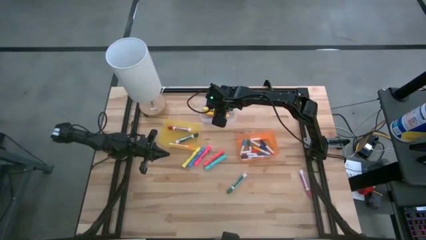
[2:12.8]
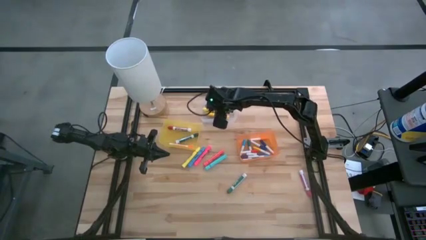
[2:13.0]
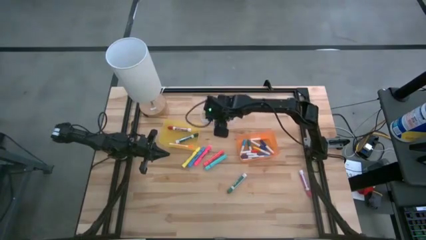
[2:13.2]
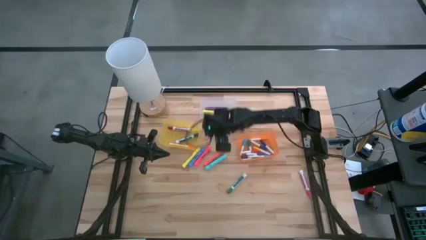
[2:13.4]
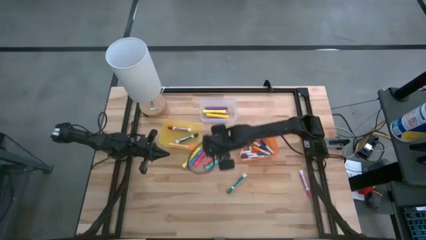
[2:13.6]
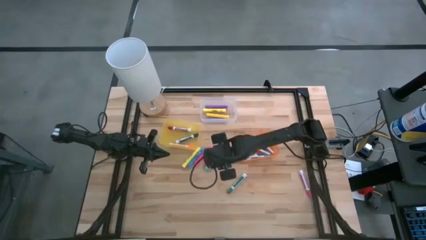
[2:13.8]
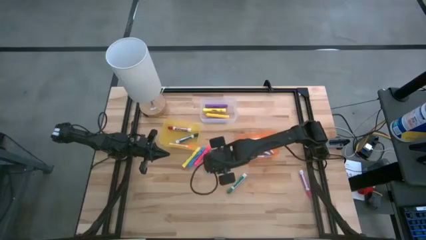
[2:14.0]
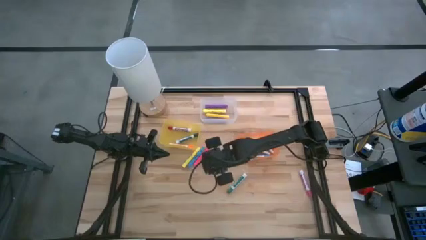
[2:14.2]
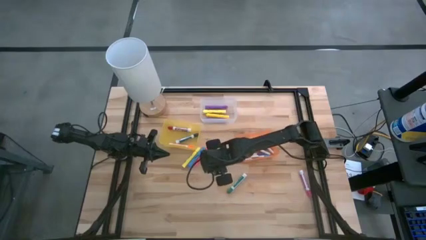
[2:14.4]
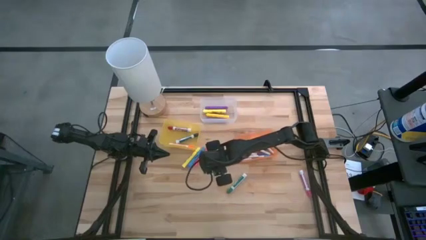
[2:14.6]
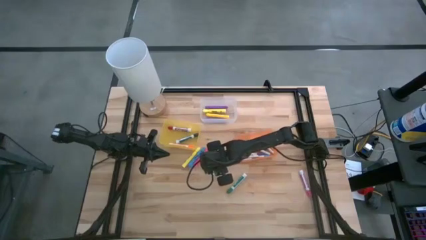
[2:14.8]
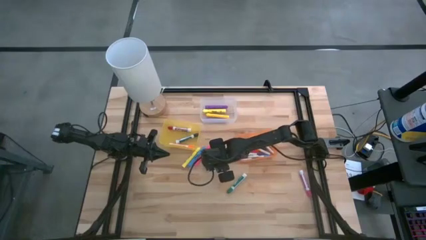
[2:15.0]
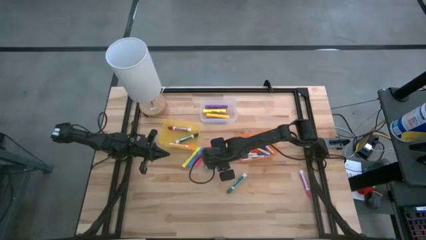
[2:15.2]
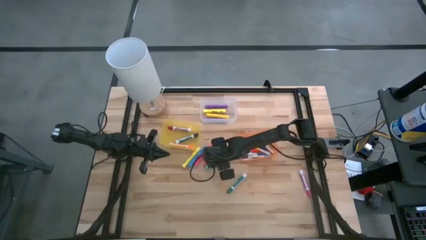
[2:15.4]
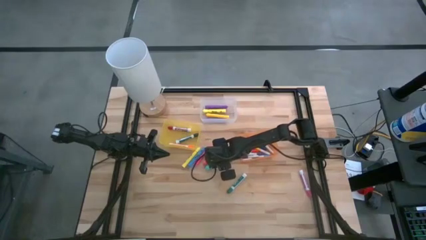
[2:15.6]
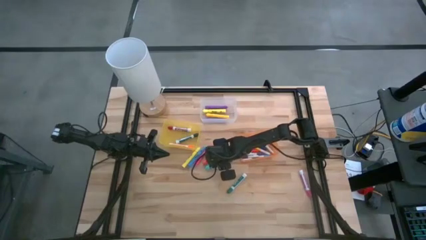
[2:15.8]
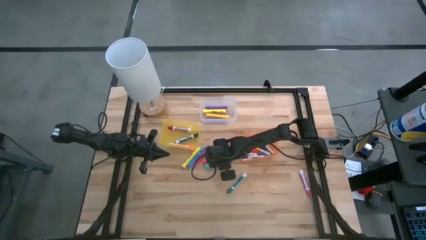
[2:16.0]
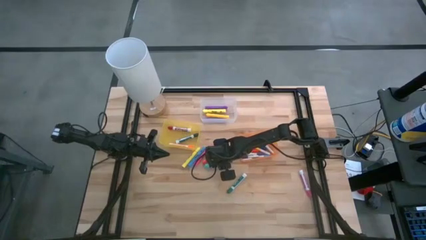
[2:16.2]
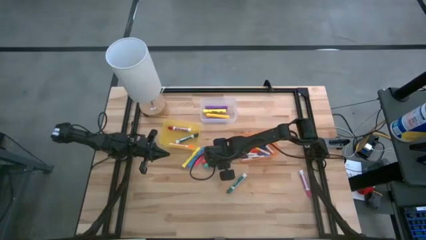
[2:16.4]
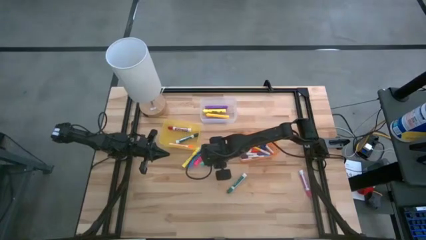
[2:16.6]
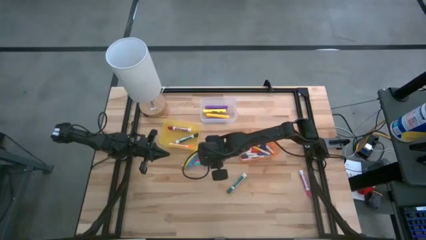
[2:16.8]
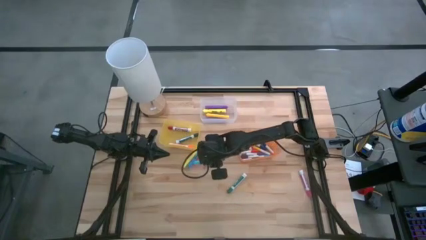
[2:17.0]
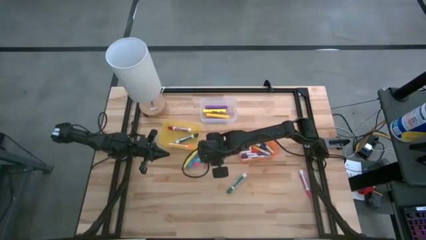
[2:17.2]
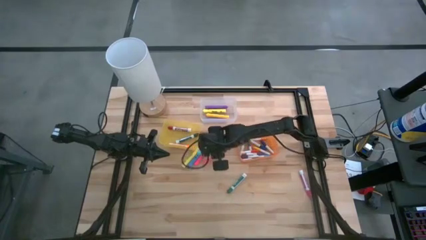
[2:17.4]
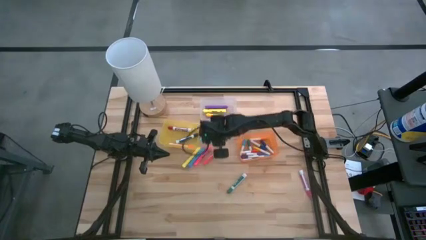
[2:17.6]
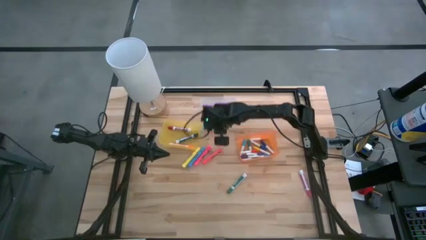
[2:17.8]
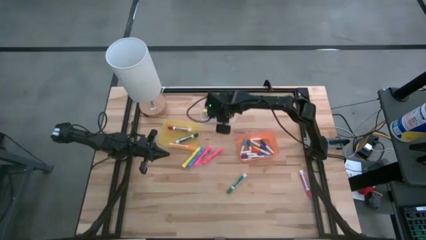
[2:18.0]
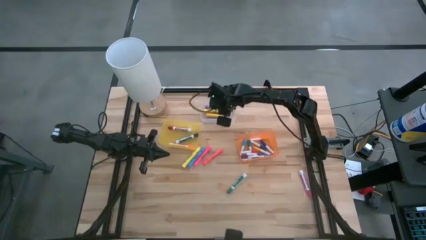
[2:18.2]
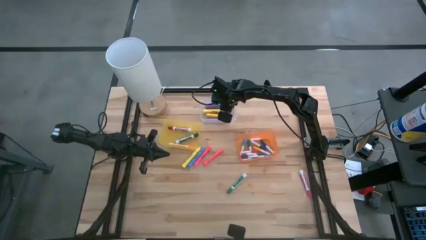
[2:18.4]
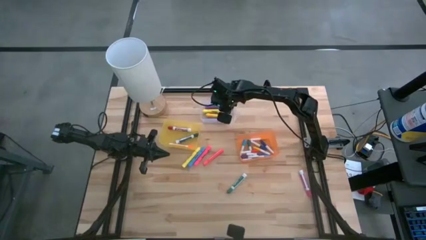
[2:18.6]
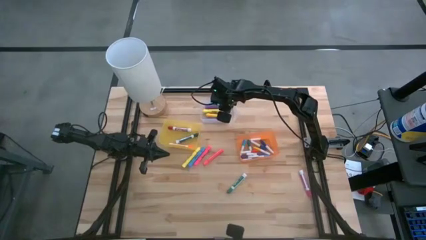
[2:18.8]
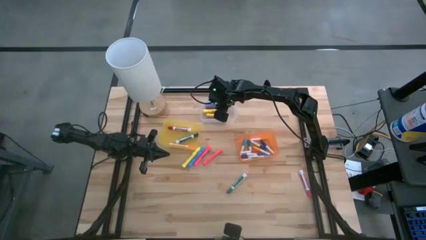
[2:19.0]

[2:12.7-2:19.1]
Task: Pick & Place Markers
Put the light blue highlighter into the transparent bin

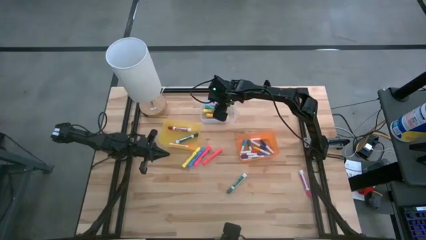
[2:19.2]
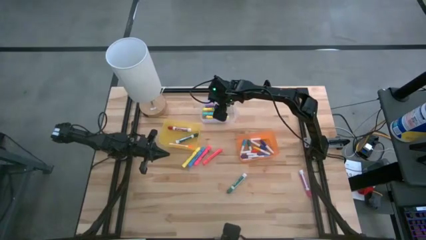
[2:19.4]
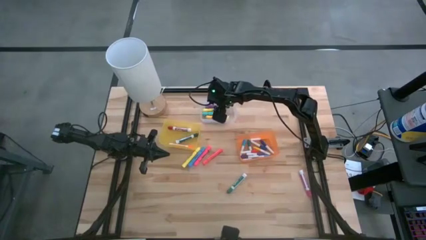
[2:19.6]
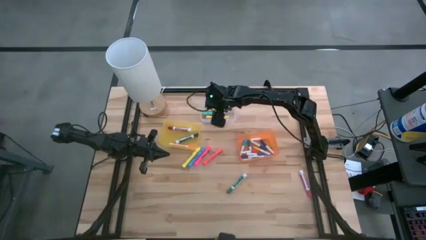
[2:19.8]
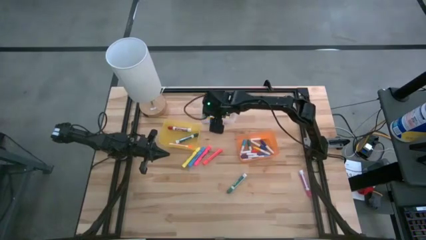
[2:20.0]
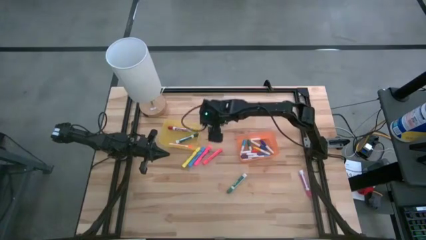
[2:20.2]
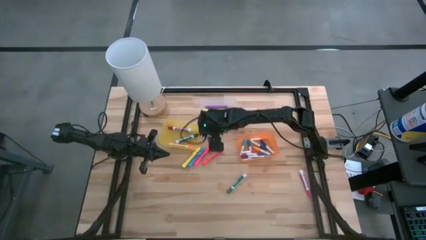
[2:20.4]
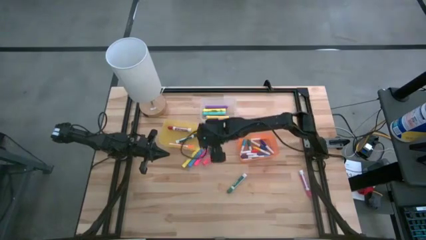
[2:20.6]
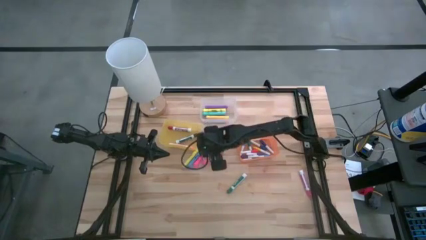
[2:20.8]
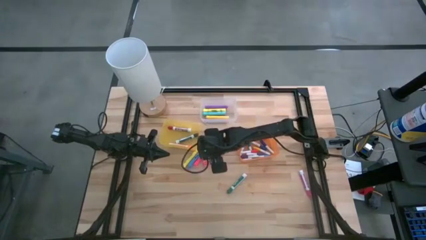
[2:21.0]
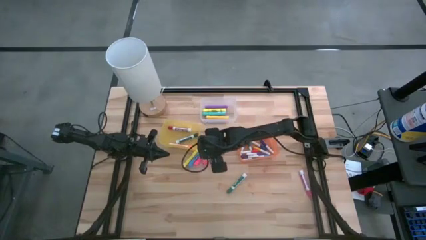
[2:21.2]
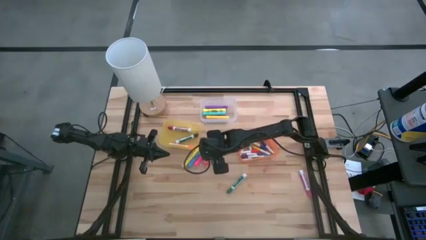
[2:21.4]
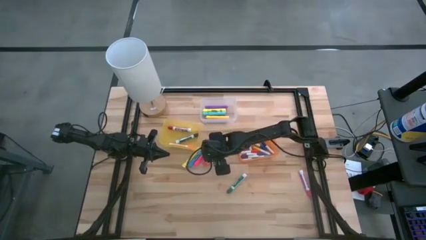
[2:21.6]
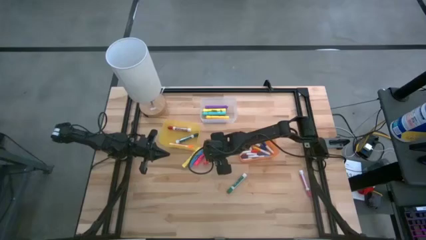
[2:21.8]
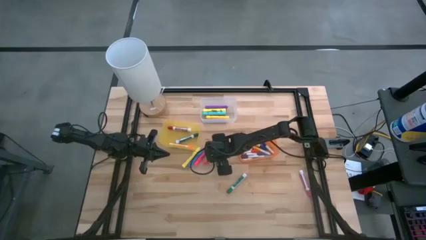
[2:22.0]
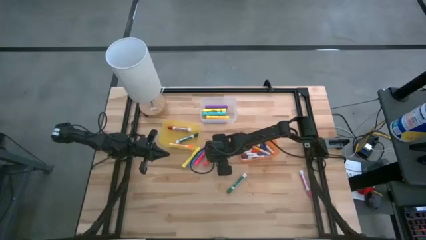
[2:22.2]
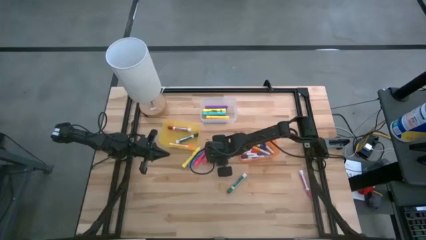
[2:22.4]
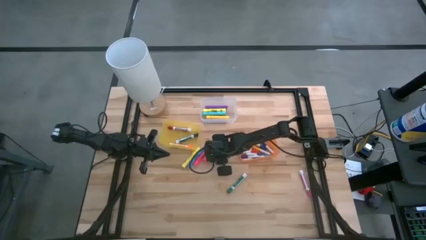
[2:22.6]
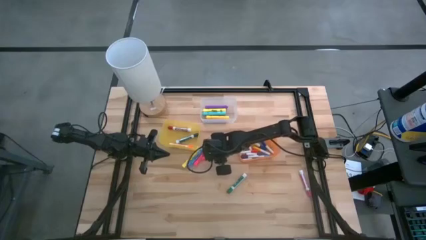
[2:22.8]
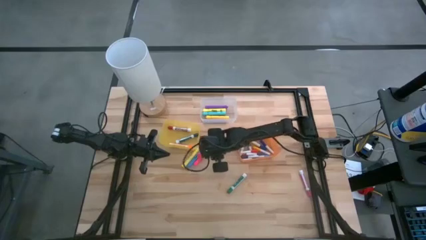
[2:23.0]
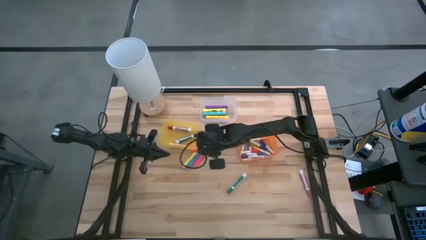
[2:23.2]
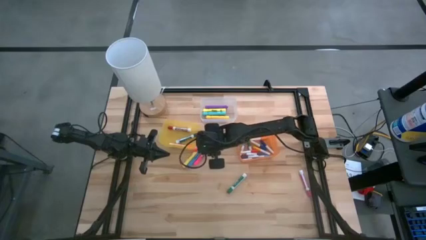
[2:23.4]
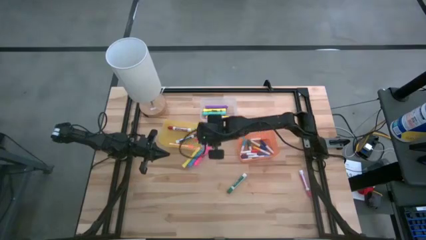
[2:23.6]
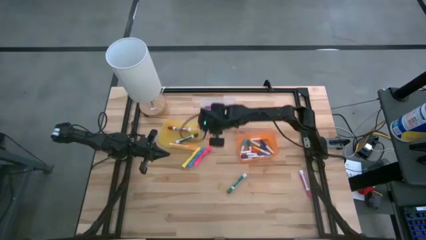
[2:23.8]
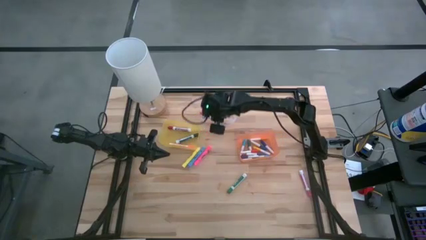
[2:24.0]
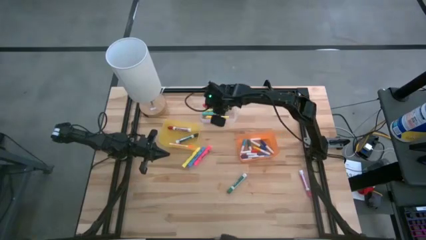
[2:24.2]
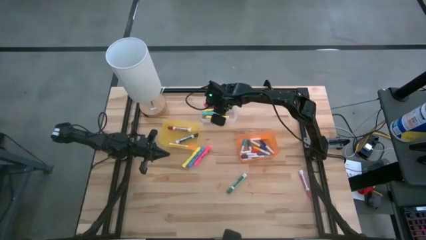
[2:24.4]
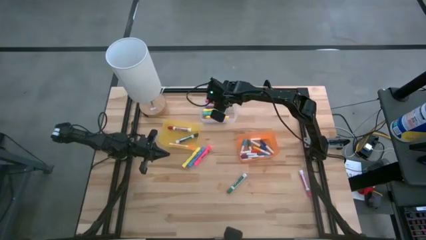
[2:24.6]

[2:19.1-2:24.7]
Put the large light red highlighter pen into the transparent bin

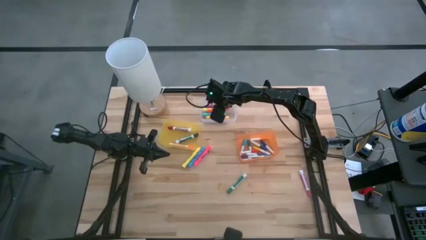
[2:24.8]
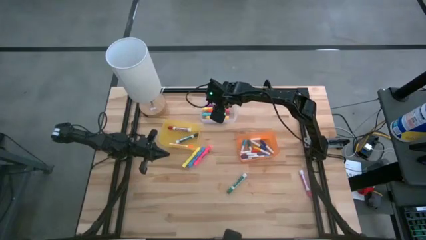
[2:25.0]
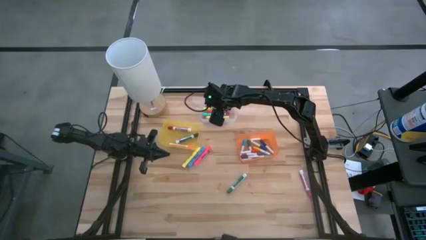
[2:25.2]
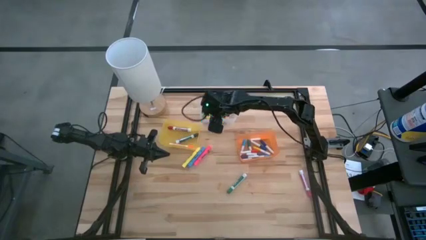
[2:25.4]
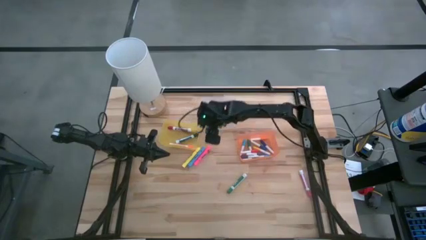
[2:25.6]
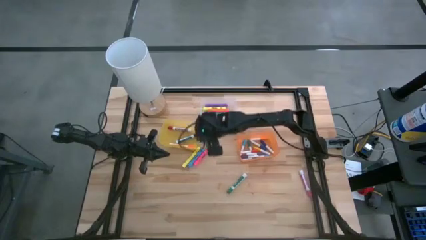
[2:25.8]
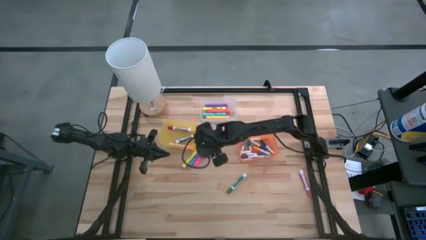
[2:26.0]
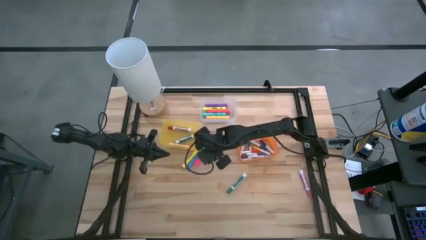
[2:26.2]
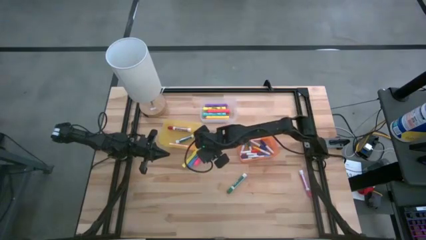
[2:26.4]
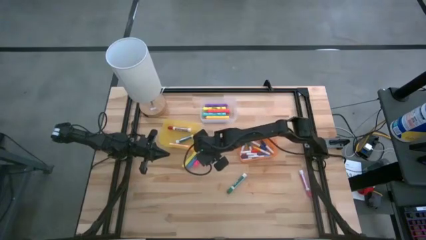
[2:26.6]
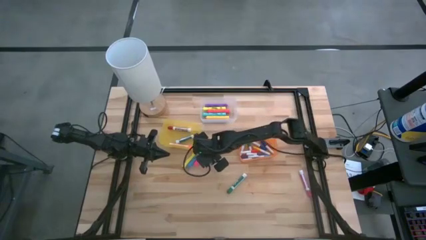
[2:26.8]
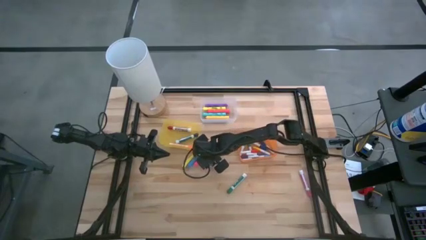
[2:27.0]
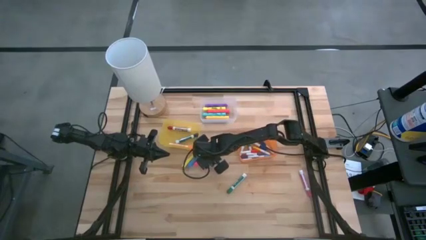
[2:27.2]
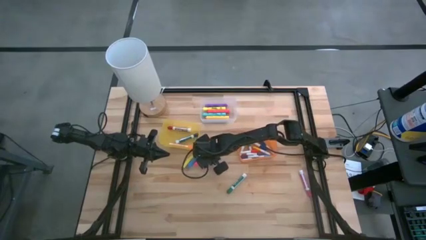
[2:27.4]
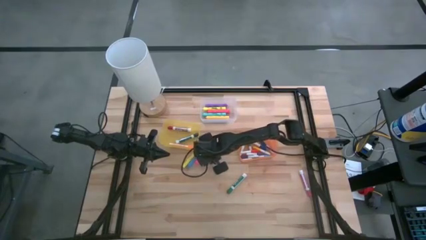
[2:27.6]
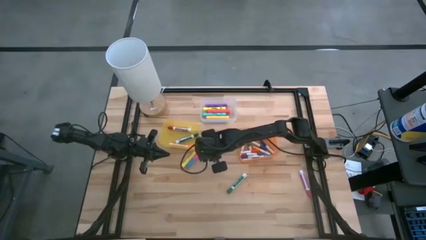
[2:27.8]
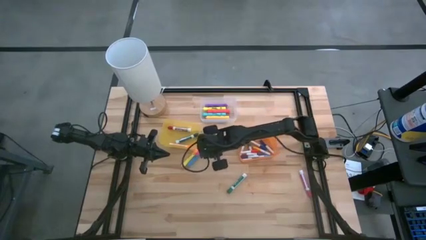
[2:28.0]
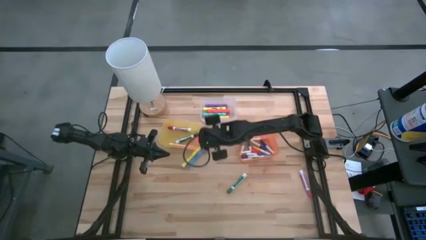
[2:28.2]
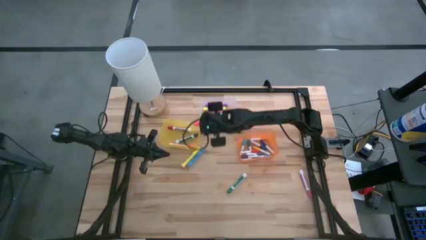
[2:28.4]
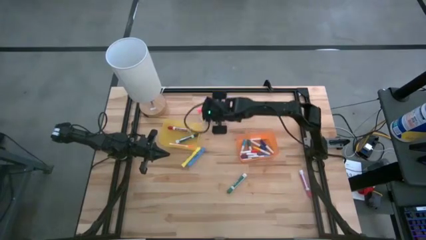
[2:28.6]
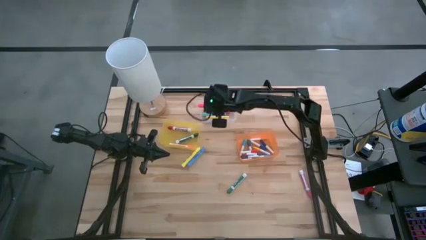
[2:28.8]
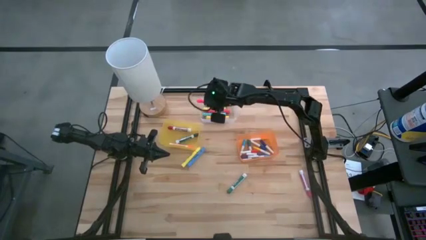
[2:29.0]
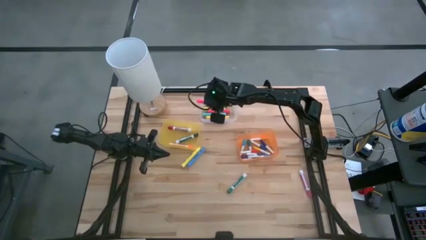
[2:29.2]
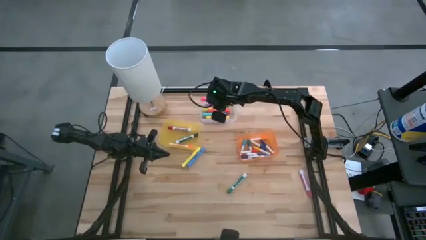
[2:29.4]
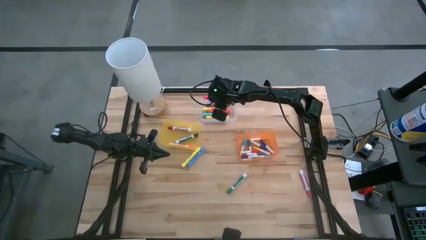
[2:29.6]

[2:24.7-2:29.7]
Put the large pink highlighter pen into the transparent bin
